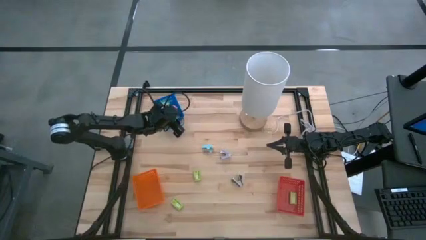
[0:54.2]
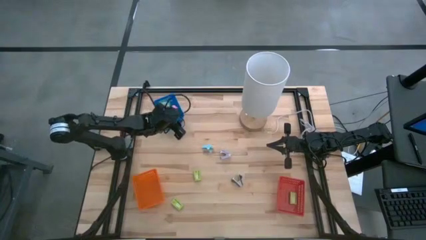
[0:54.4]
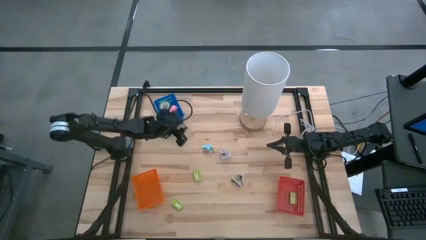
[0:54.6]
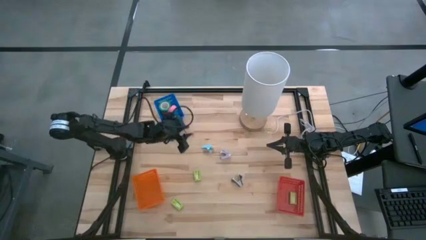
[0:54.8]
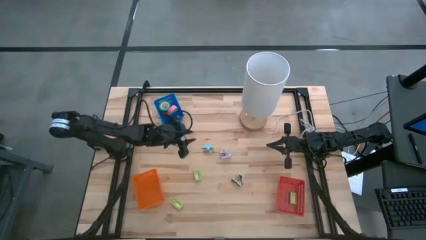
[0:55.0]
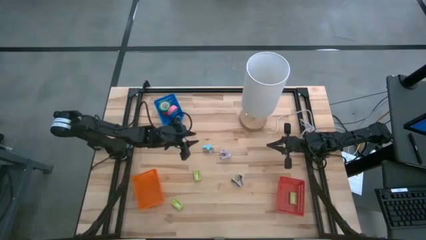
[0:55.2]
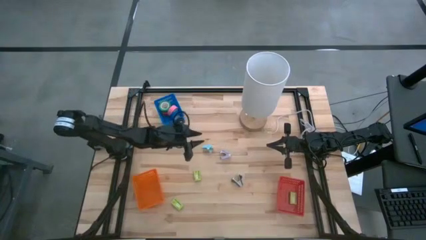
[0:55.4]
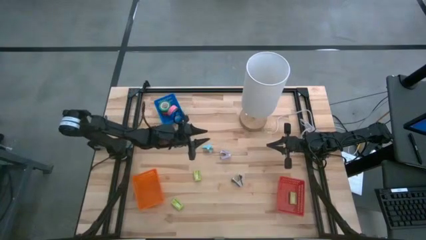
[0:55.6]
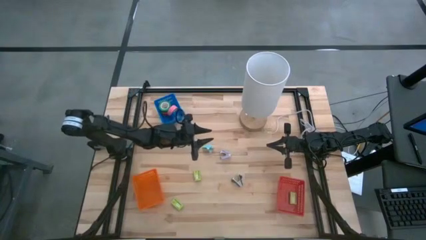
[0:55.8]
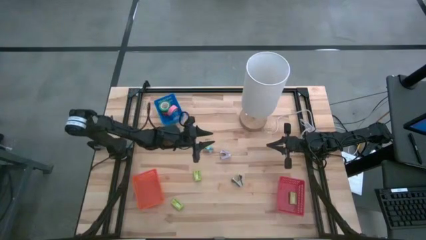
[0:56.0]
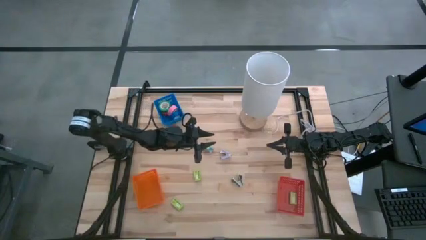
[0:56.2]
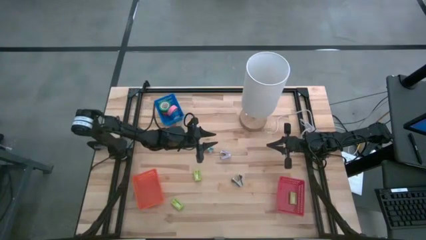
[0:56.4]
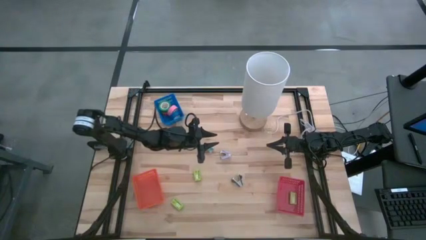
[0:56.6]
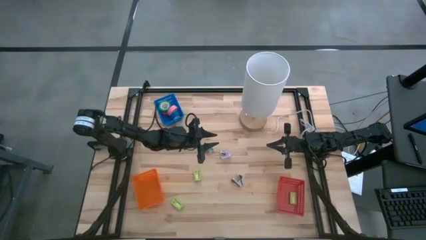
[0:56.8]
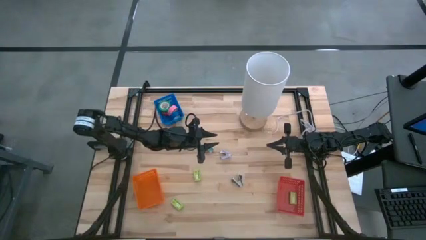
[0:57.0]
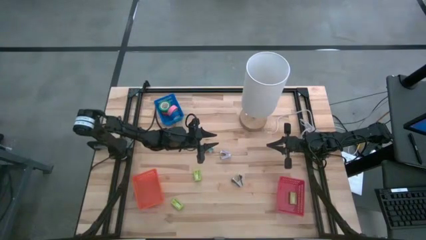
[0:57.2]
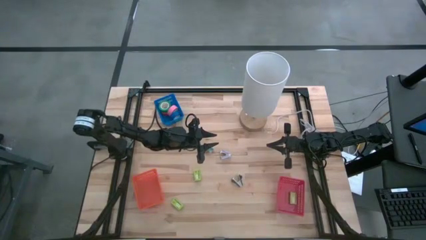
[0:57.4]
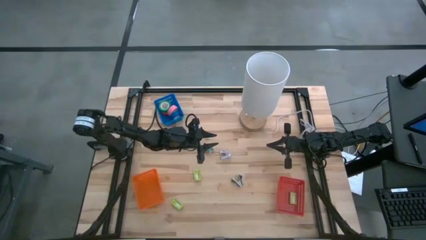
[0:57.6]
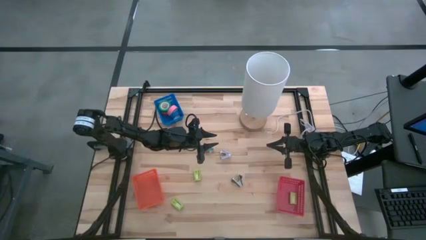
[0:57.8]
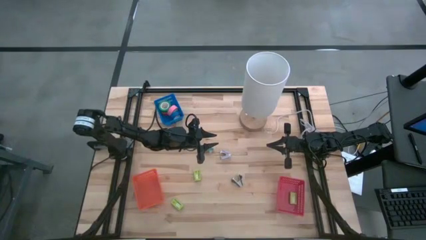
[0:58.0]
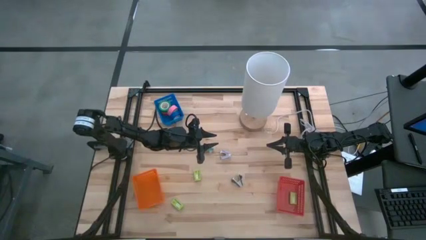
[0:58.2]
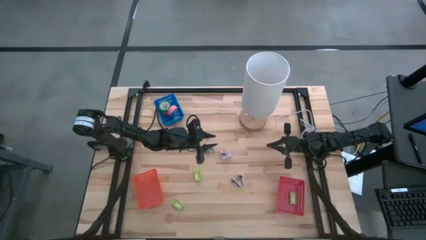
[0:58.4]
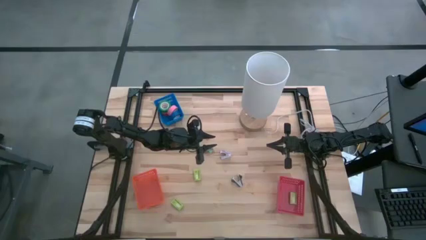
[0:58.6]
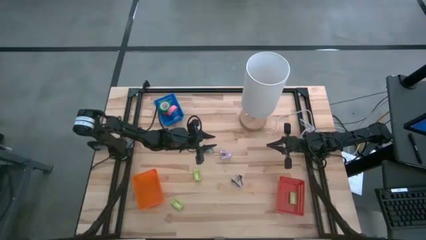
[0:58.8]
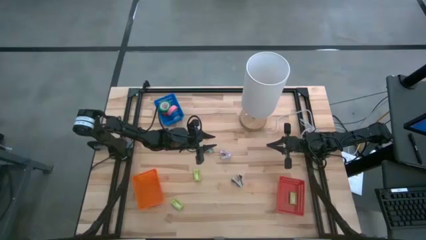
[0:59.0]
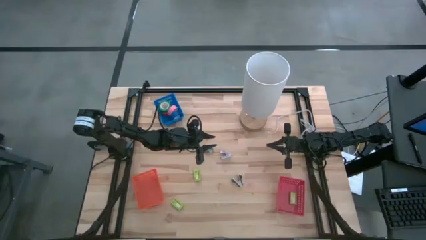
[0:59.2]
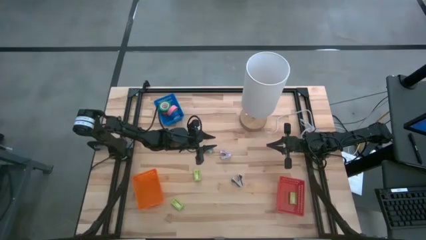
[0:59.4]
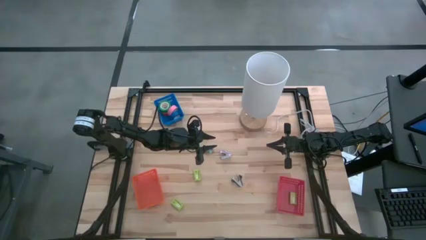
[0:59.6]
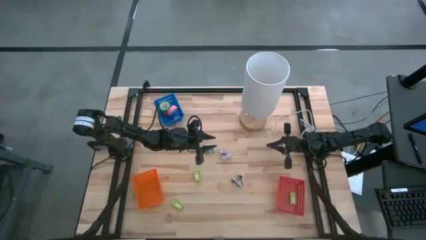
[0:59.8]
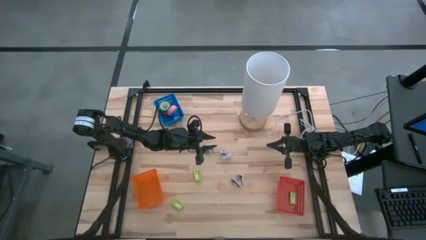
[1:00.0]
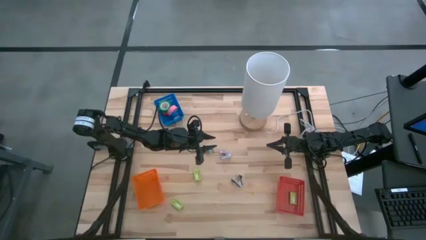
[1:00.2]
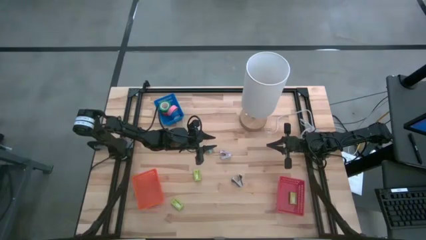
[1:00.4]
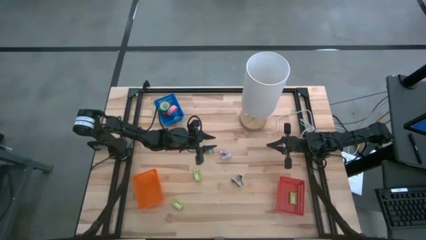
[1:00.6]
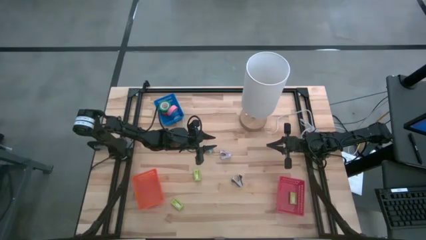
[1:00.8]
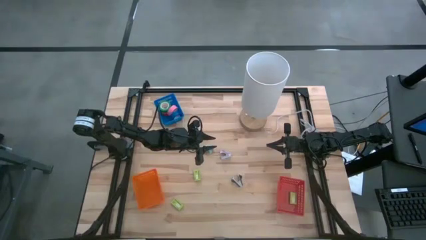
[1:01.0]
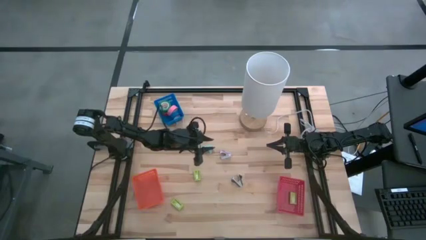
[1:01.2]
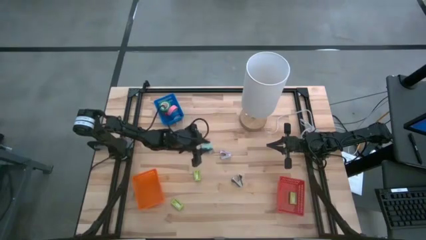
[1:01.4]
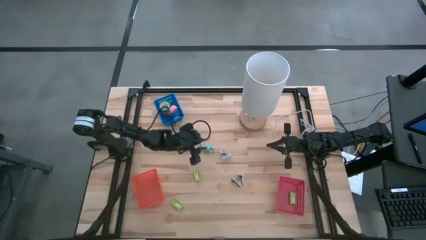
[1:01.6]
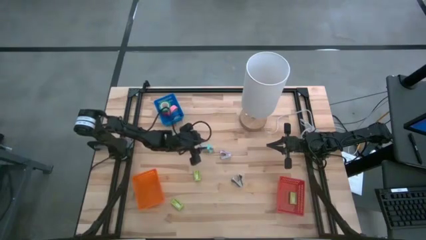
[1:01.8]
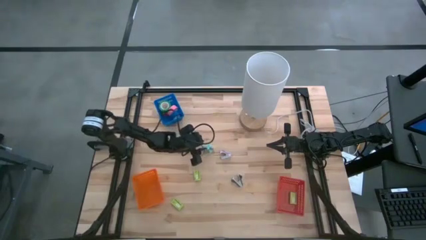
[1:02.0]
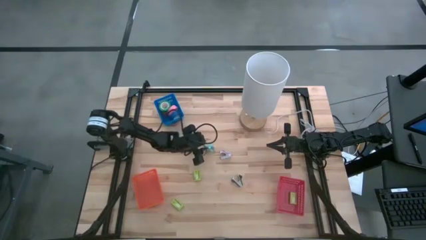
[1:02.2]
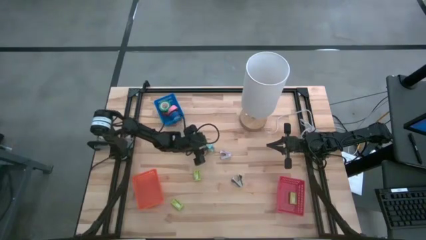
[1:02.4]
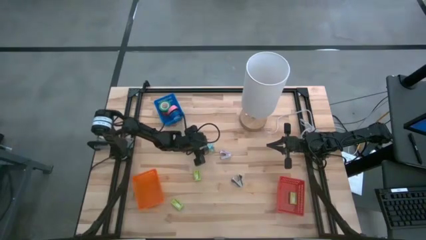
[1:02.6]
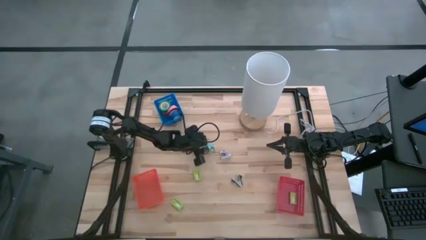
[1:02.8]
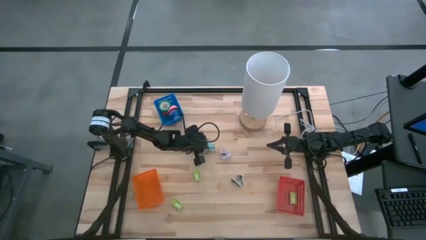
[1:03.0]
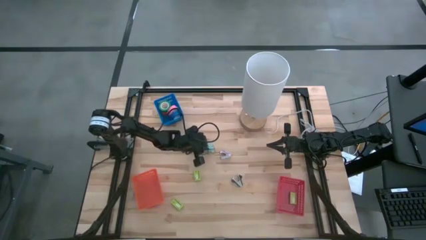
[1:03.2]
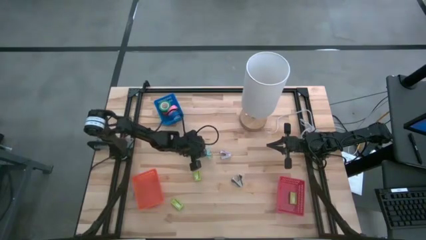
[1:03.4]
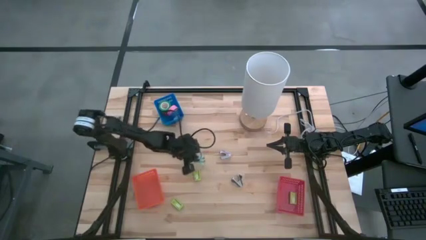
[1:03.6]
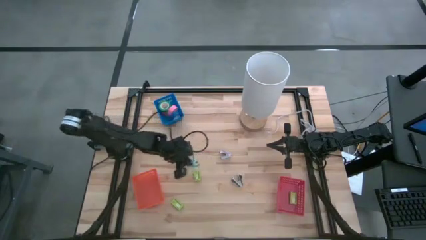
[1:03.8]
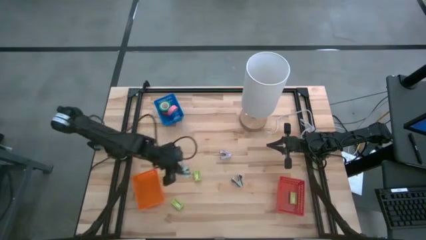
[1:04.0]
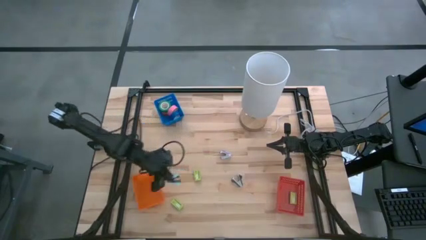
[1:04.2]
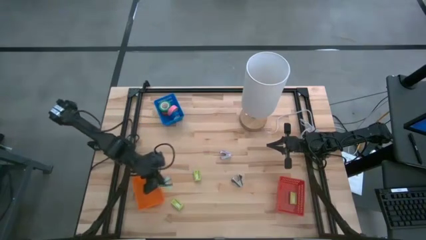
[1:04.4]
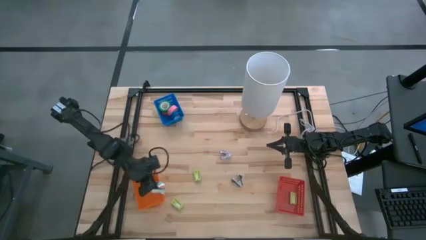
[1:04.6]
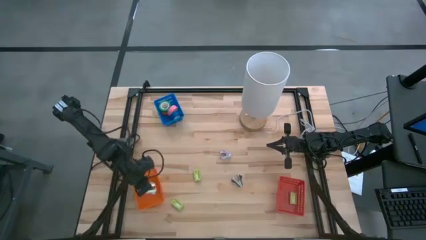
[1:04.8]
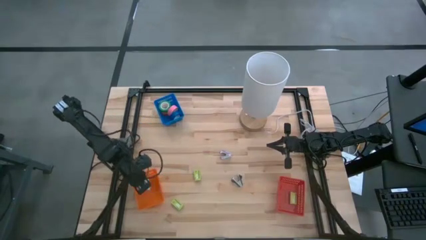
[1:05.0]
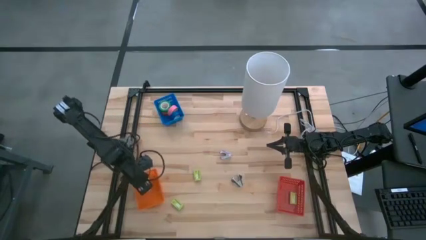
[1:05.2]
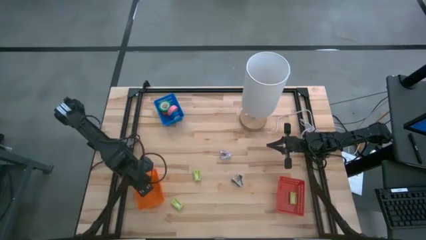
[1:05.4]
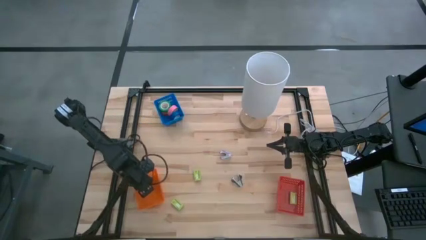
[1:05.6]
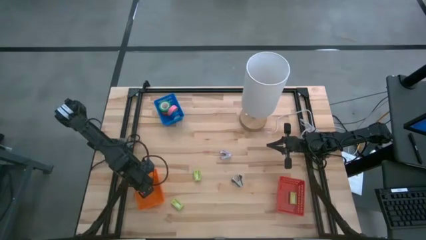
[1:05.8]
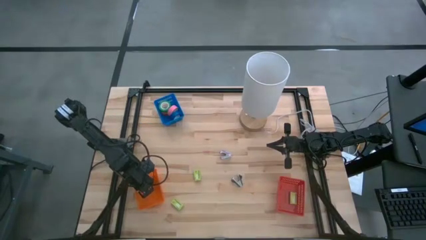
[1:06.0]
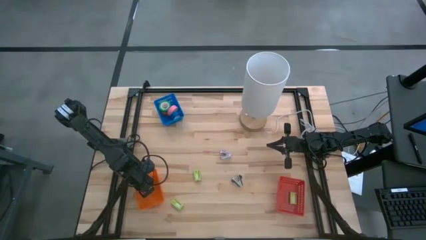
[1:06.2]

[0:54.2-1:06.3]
Task: Pick and place Stapler, Stapler remover, tape
Put the blue staple remover into the orange basket

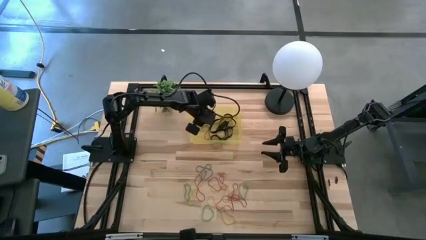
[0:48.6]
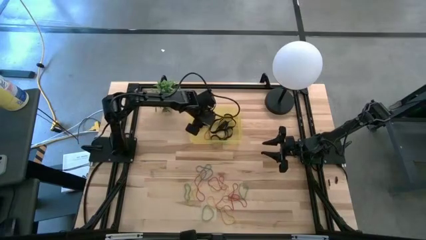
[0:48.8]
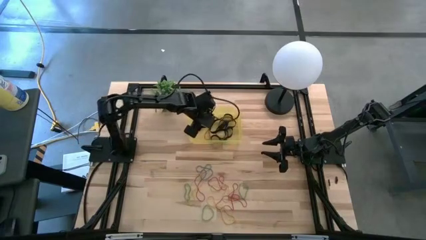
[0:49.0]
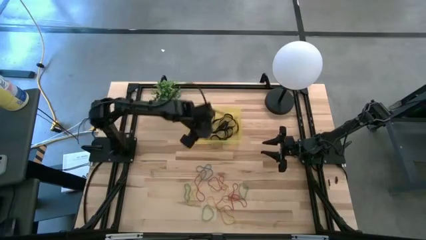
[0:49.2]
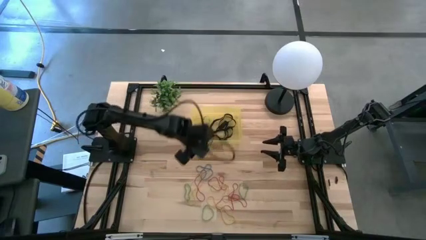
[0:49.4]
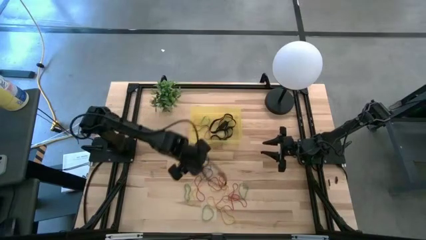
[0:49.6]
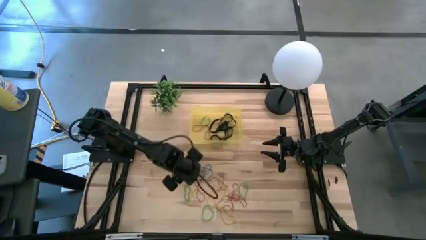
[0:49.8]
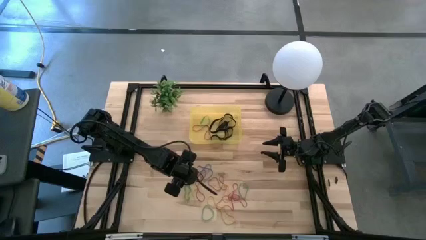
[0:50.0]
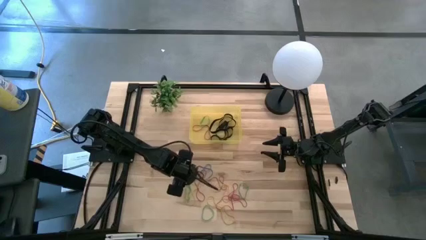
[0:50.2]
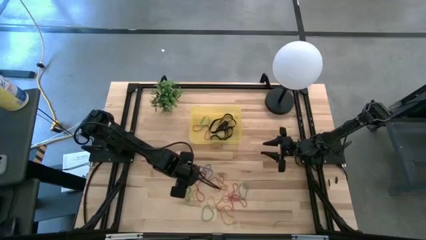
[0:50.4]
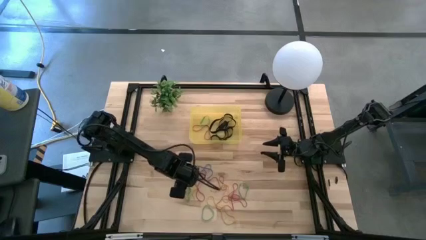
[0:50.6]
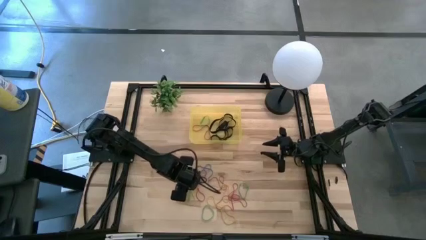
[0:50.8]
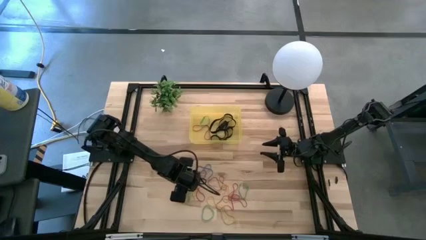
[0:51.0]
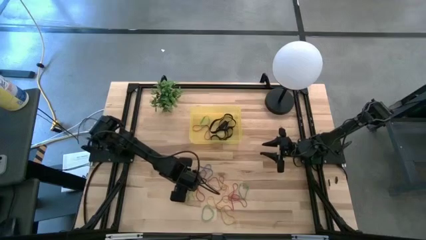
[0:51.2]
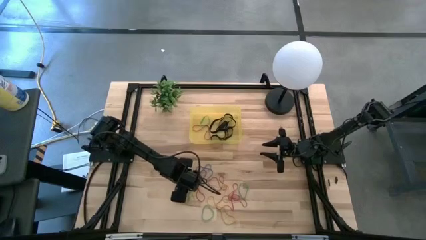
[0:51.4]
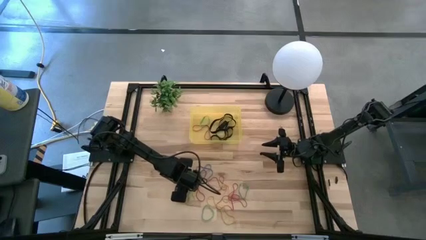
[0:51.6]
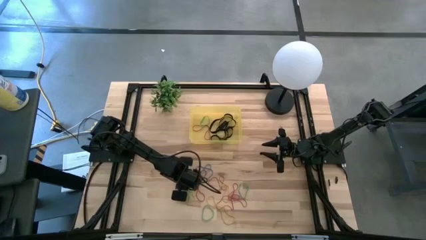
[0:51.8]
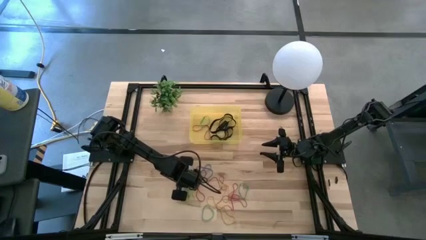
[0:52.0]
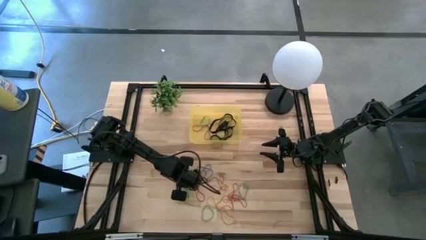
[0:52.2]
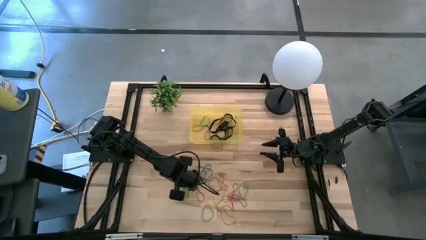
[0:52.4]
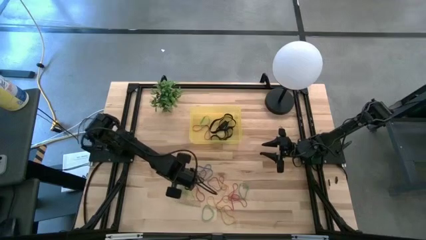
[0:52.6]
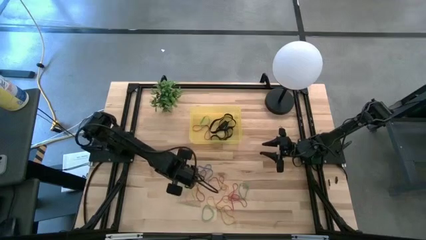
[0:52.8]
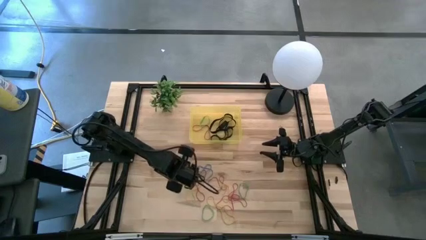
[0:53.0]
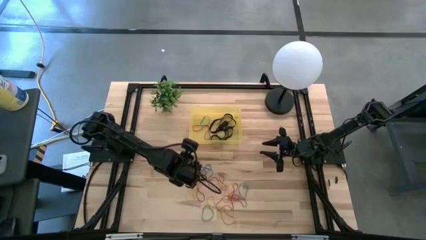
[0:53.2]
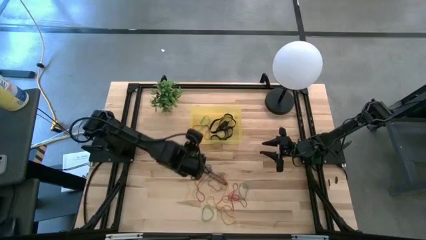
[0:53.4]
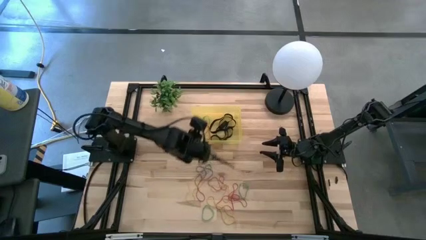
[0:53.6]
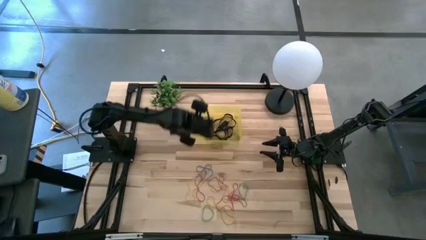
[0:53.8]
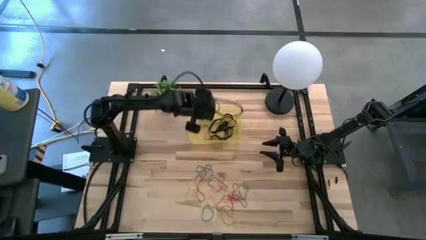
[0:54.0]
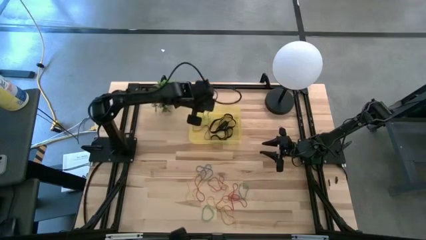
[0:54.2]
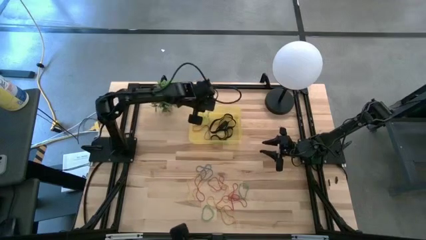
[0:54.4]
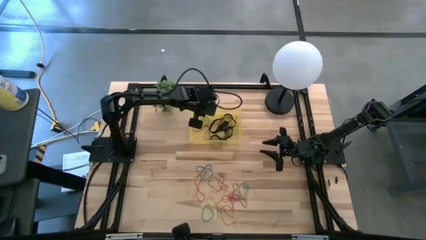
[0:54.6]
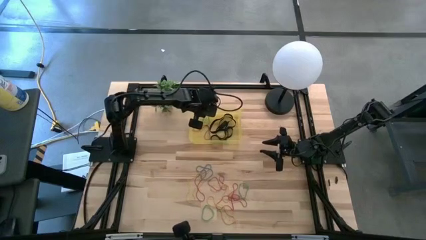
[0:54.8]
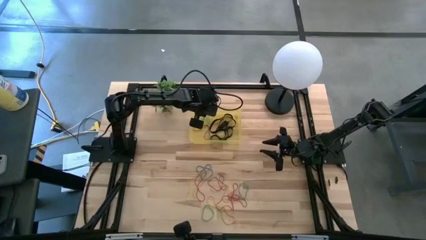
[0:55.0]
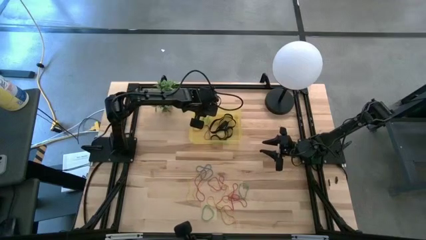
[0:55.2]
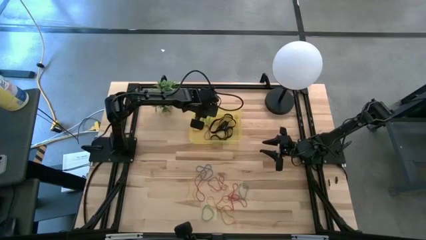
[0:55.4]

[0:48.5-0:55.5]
Task: Pick and place rubber bands into bin
Put the green rubber band into the yellow bin
